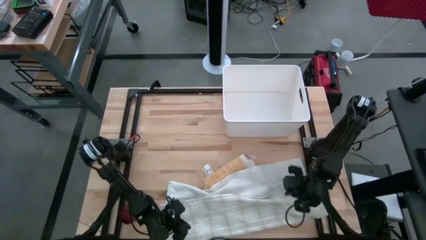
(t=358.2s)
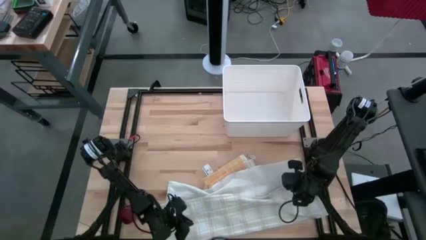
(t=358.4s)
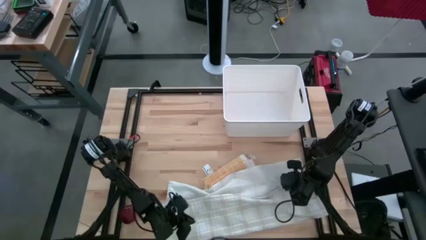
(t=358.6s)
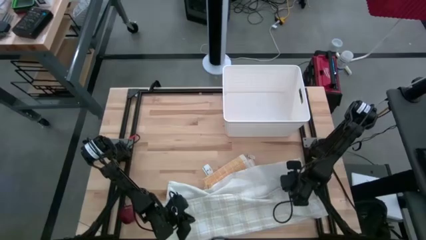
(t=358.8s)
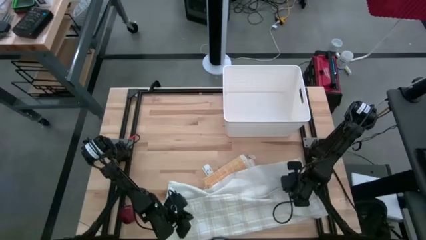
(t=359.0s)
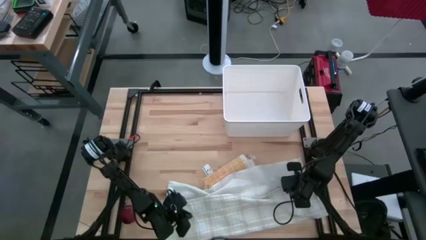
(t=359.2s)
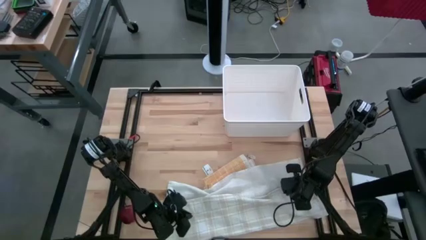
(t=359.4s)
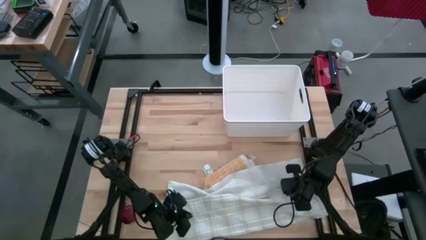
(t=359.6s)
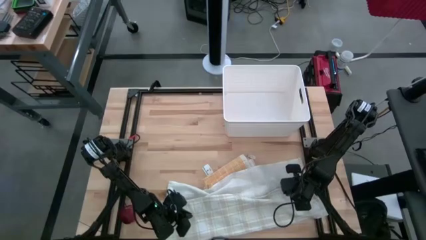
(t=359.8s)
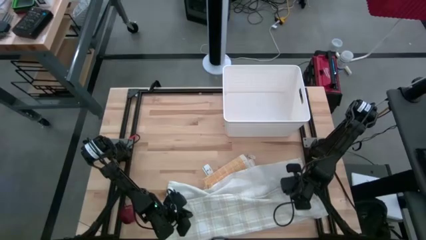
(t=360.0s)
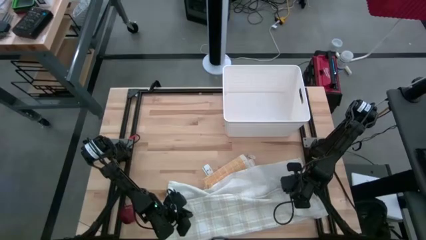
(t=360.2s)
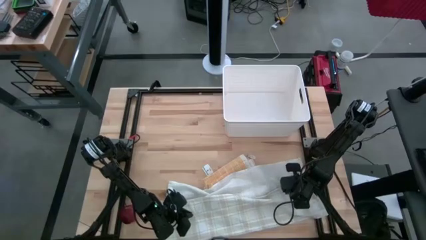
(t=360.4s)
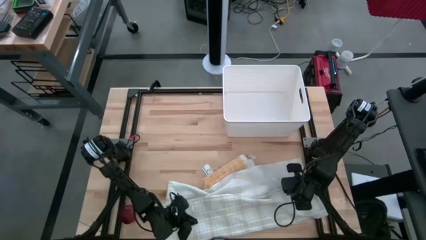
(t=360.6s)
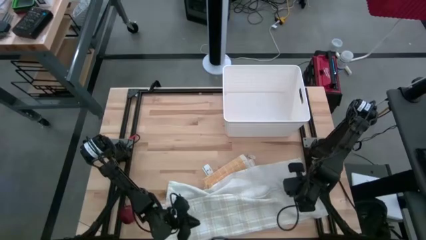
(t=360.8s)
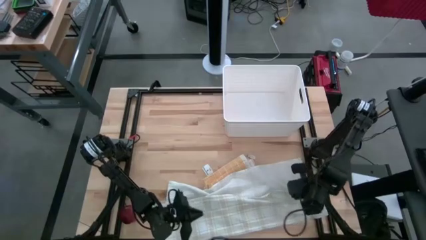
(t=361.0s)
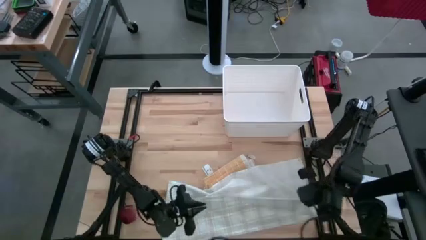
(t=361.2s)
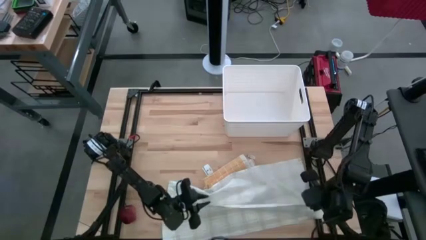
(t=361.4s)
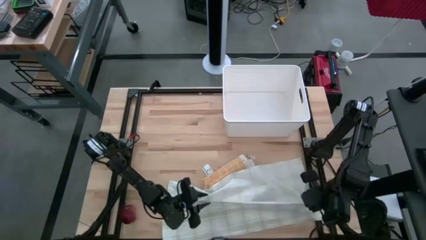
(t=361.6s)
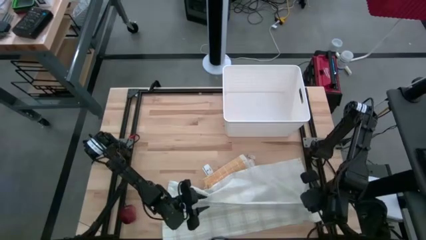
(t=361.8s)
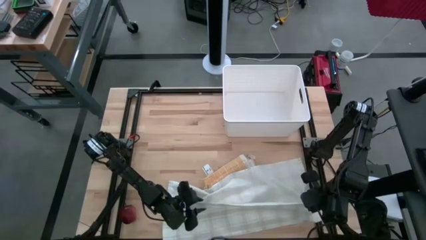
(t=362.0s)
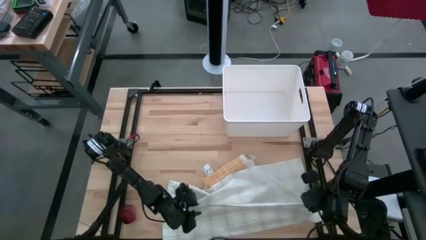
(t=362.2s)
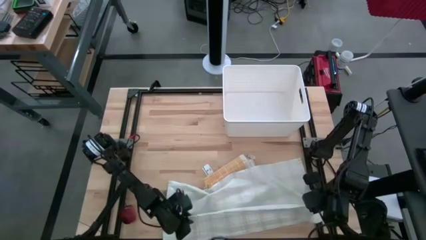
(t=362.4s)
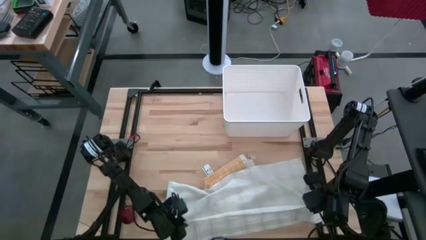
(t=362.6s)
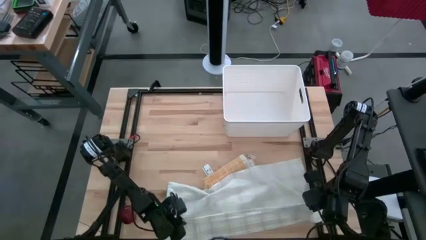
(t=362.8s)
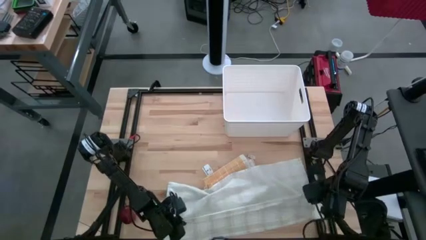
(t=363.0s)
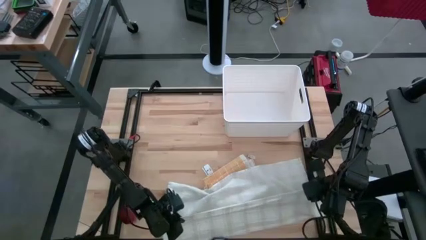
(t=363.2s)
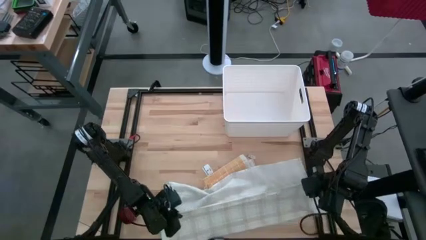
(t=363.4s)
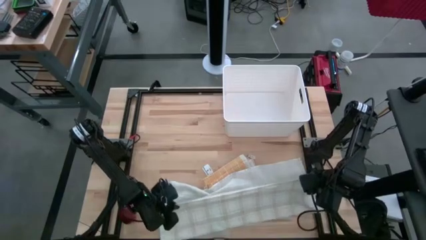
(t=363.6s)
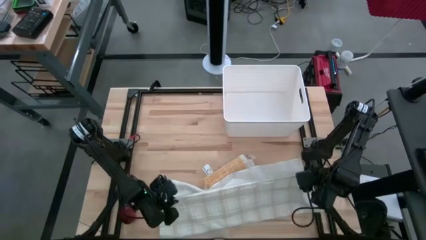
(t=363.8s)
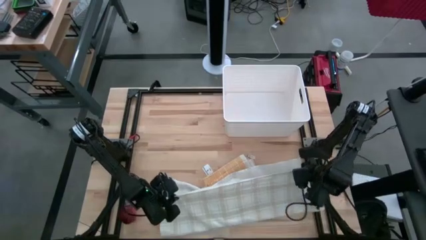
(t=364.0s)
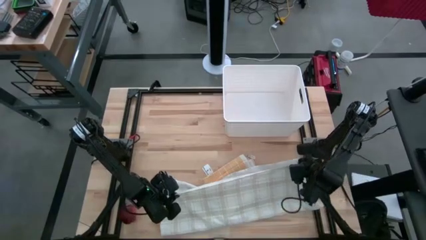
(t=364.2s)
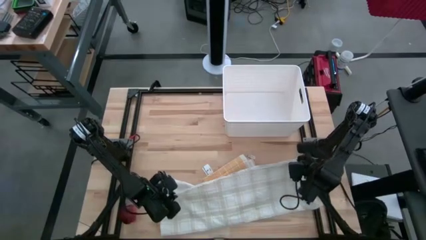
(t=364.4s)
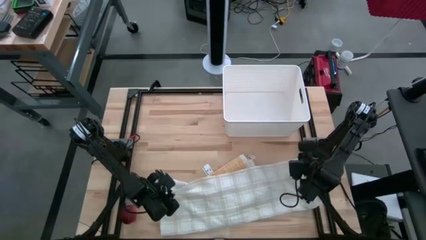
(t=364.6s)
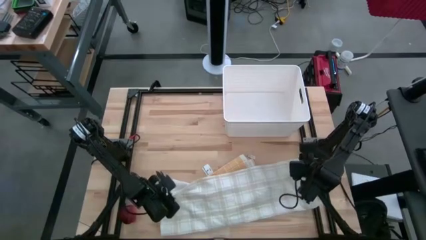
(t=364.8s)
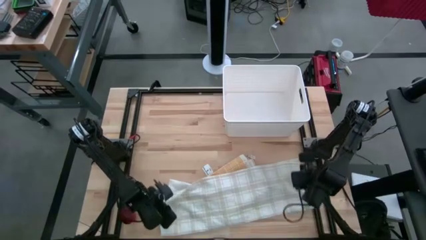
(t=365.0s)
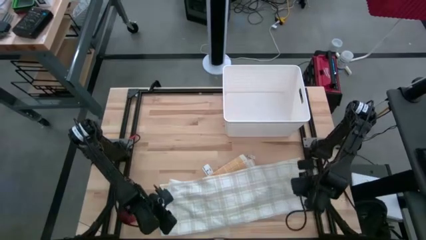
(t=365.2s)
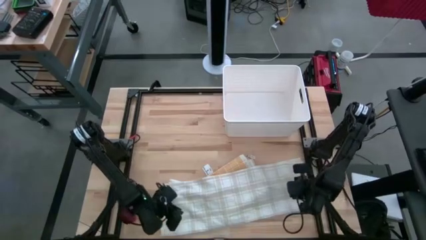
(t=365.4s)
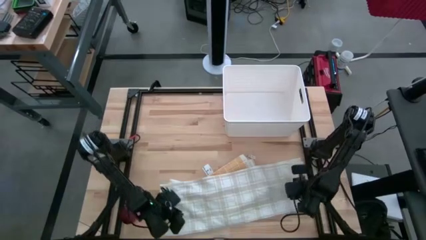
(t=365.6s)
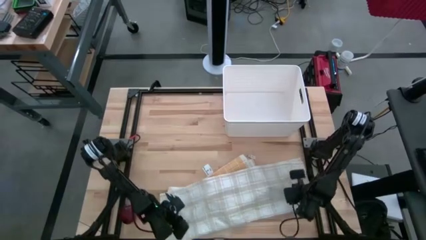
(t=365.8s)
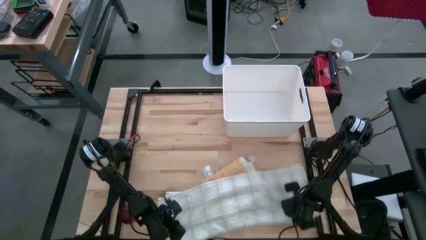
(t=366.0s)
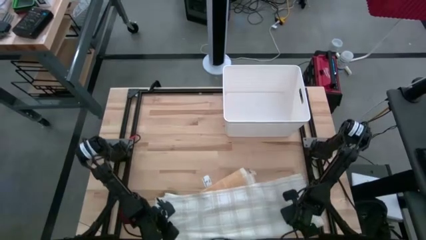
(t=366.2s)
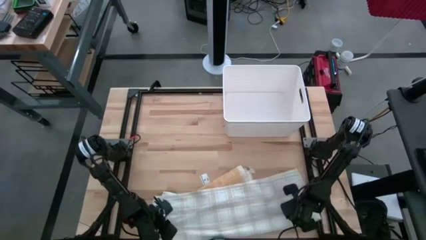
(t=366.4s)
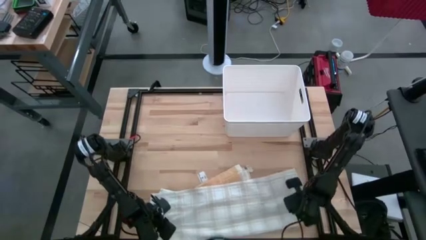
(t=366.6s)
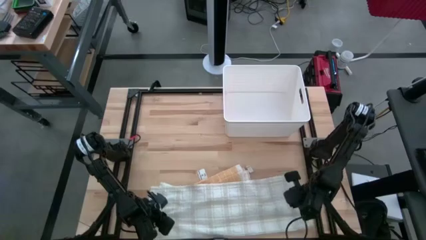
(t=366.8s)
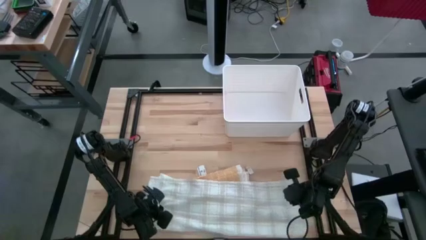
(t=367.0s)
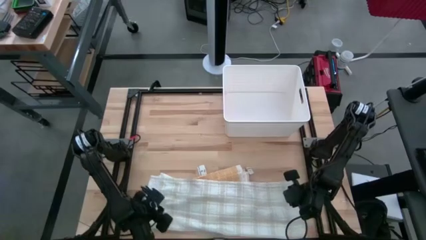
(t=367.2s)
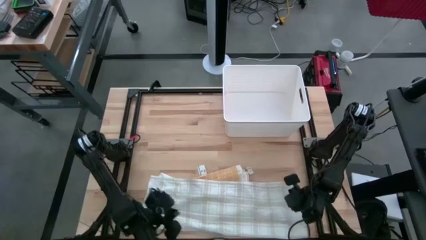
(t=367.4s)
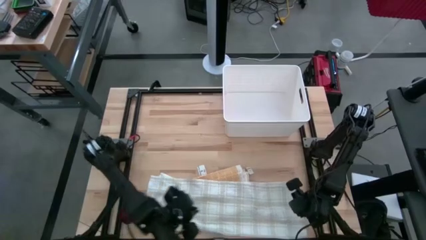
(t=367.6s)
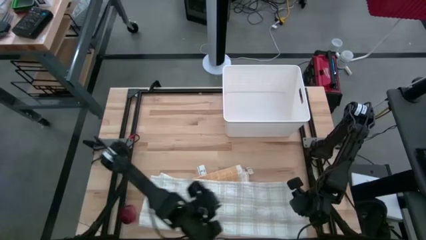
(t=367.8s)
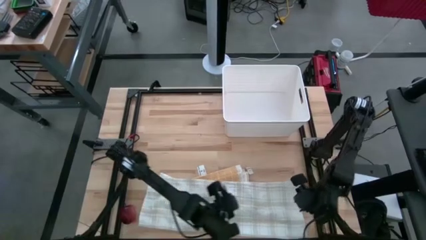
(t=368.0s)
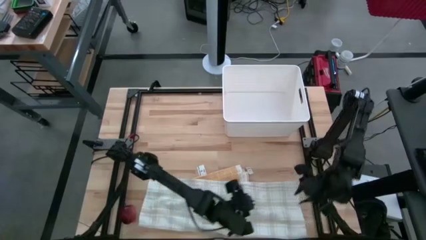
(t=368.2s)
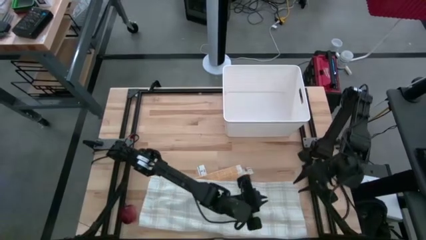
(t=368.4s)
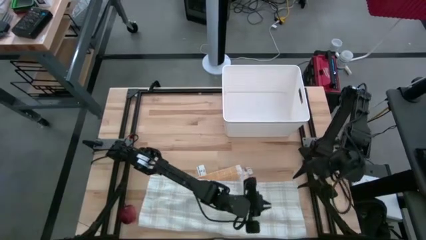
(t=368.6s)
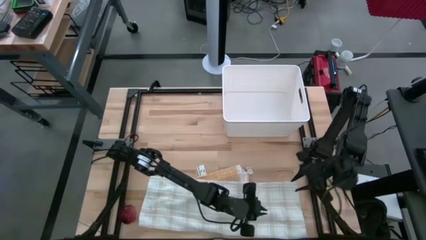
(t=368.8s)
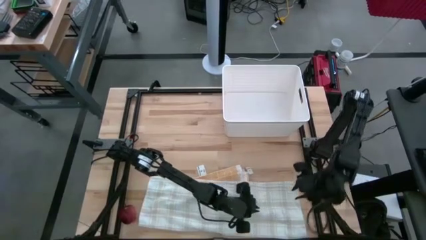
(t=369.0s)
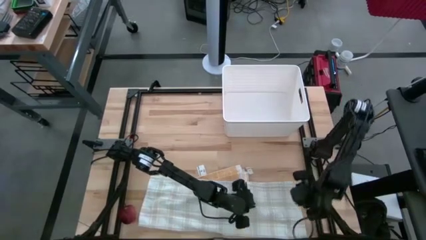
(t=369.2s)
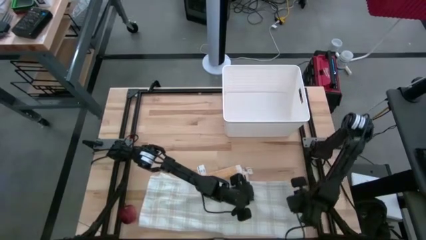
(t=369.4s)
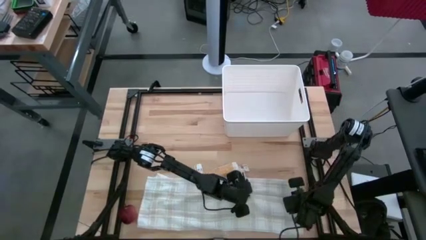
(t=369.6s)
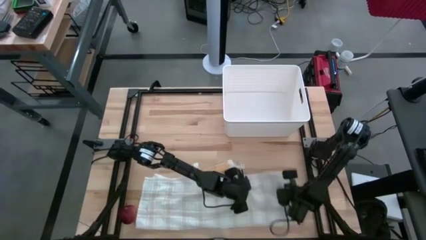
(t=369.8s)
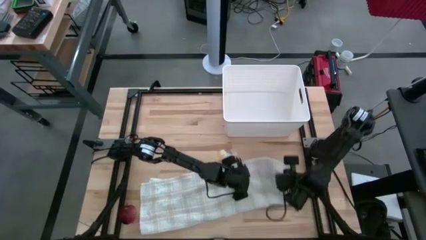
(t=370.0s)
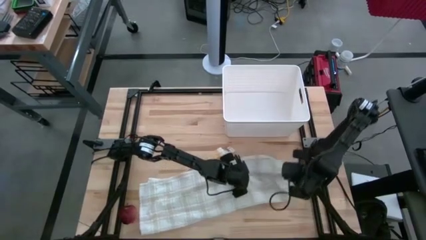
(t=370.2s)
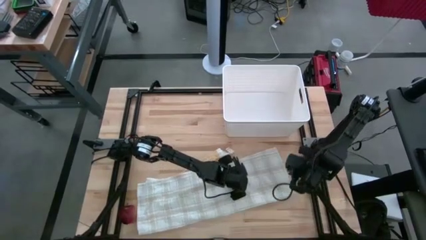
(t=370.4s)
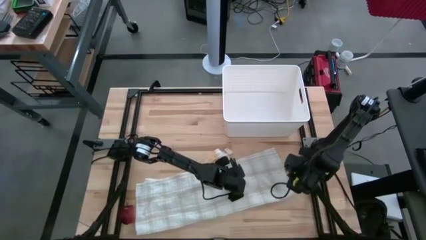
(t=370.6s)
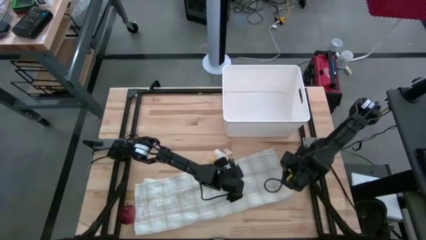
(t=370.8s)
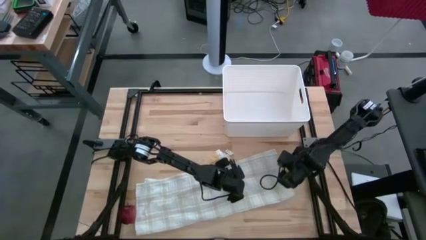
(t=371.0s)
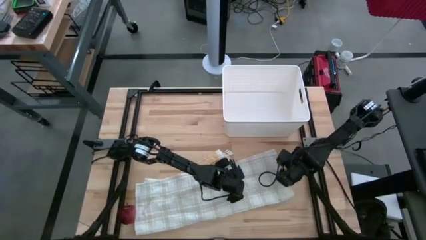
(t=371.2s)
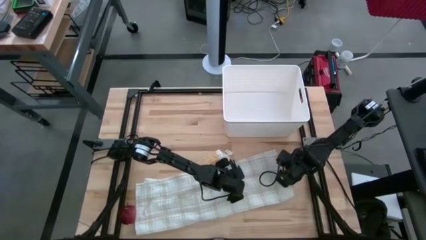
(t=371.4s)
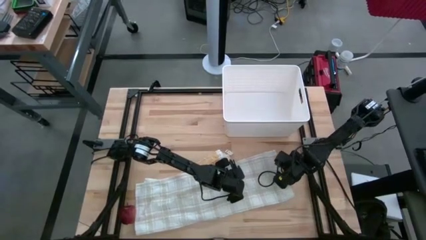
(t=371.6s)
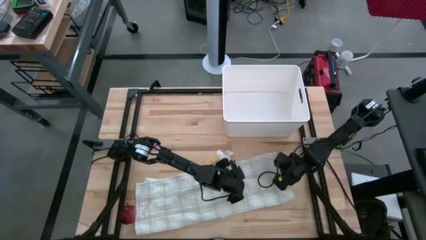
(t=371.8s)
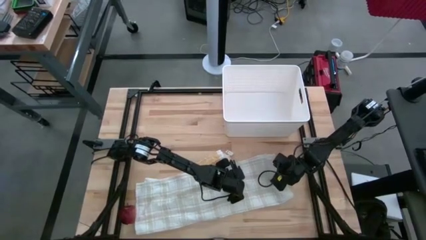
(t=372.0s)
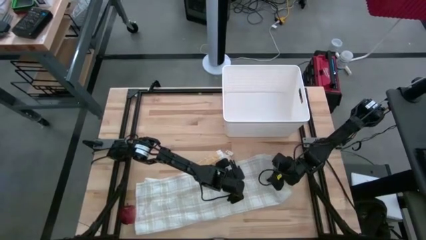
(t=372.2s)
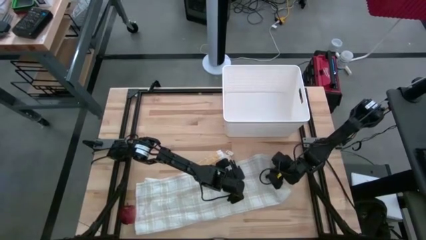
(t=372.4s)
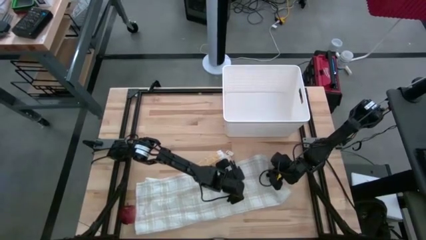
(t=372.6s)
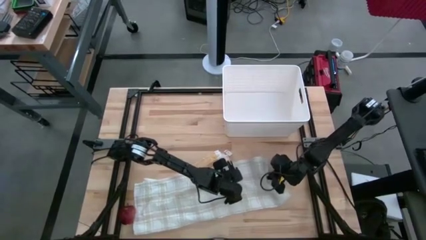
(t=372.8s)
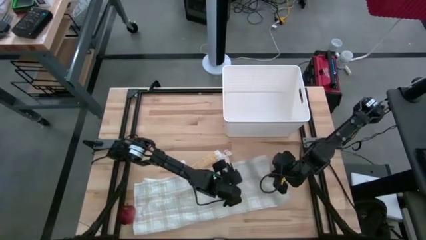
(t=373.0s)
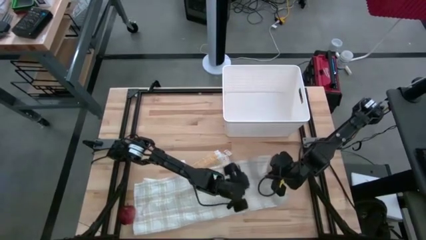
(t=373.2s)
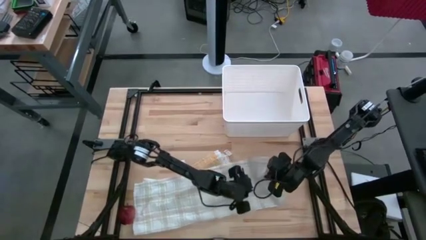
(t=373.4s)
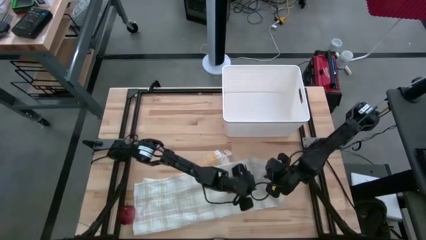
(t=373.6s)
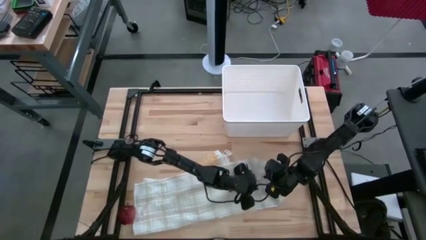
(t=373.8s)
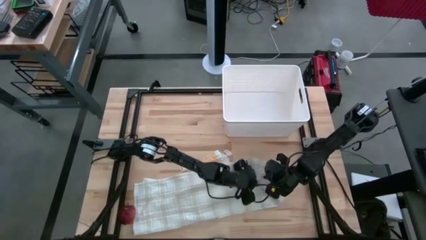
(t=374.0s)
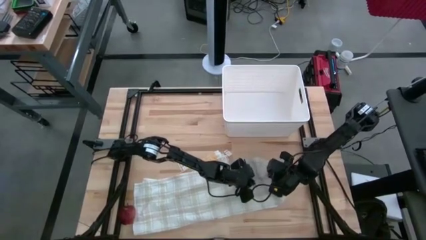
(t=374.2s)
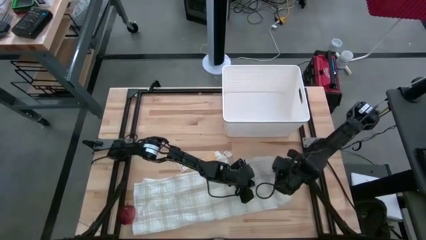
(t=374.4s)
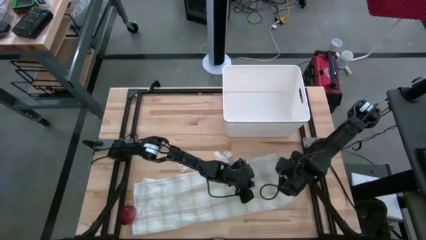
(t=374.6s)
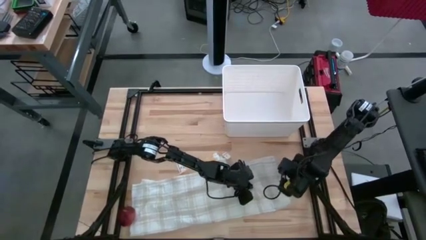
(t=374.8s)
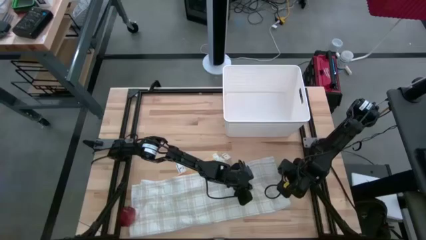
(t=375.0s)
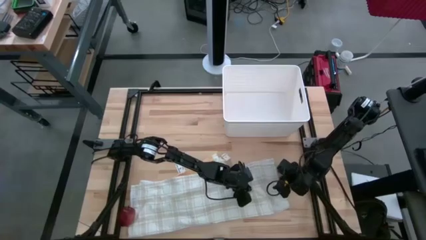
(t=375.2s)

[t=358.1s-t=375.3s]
Task: Fold towel
Fold the white checkered towel
